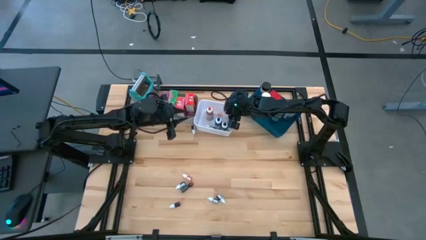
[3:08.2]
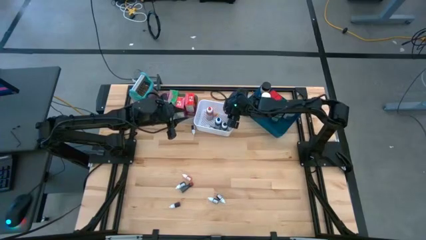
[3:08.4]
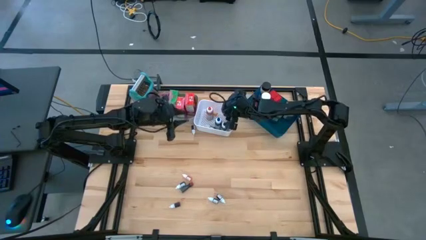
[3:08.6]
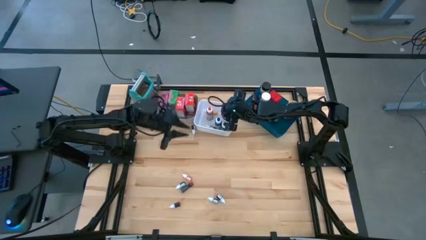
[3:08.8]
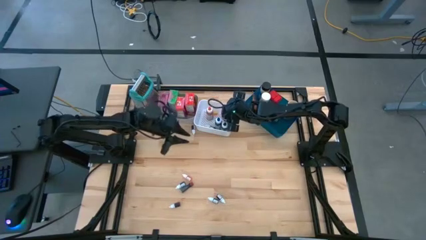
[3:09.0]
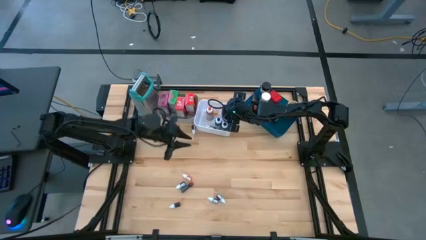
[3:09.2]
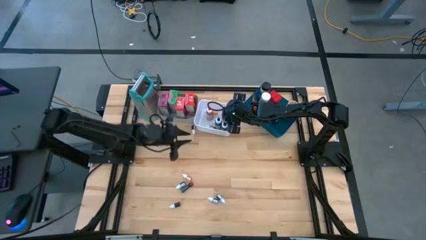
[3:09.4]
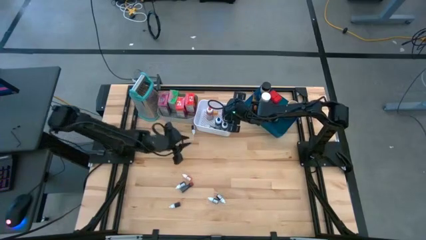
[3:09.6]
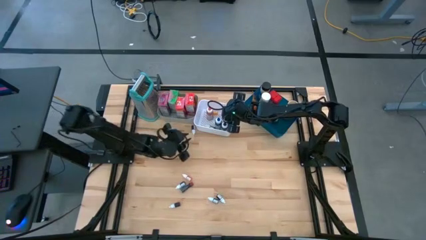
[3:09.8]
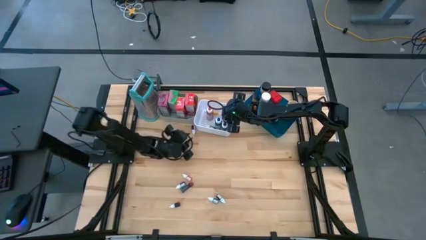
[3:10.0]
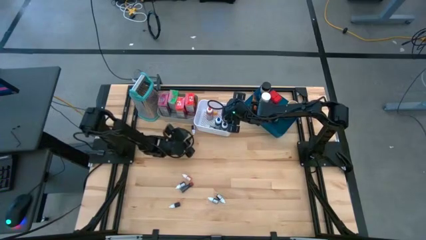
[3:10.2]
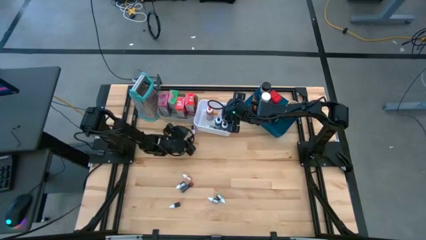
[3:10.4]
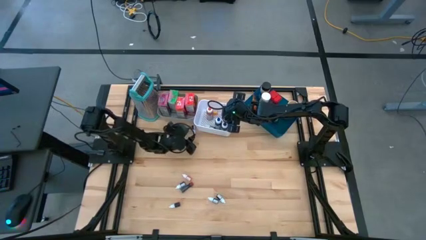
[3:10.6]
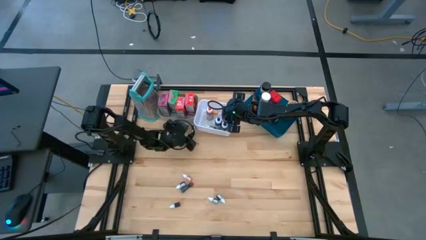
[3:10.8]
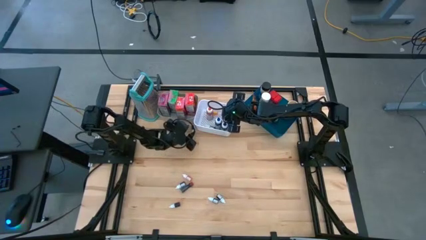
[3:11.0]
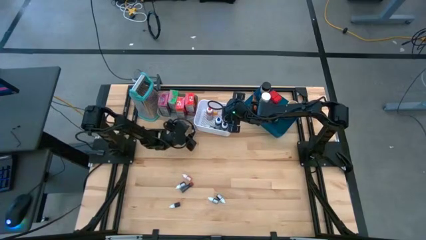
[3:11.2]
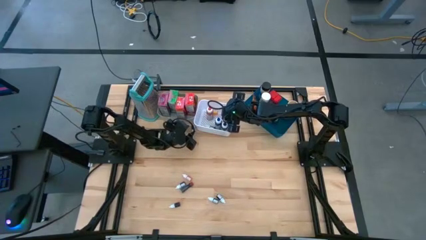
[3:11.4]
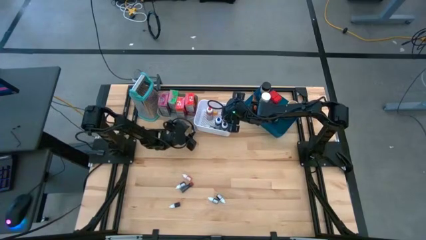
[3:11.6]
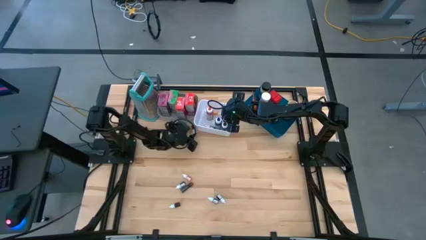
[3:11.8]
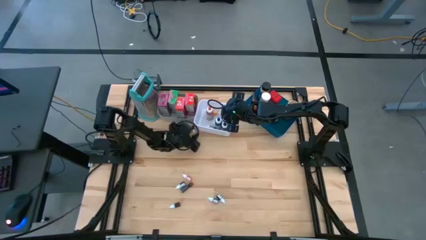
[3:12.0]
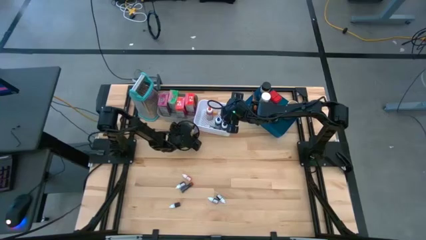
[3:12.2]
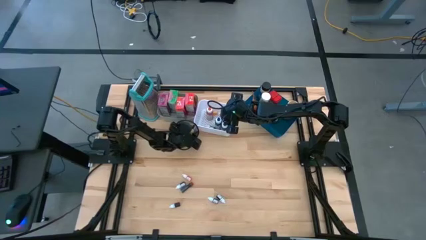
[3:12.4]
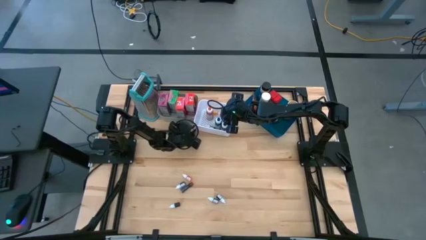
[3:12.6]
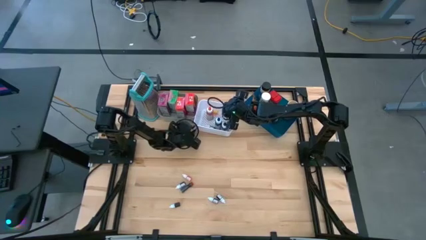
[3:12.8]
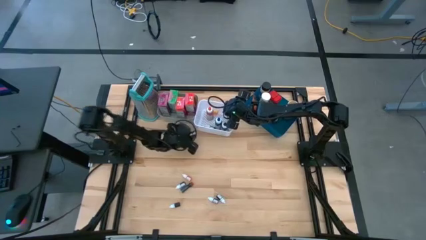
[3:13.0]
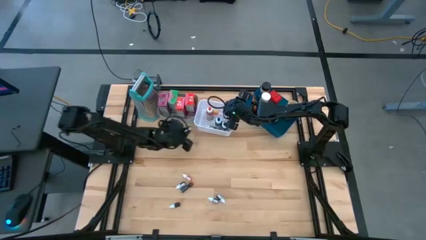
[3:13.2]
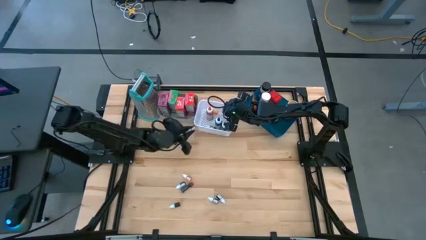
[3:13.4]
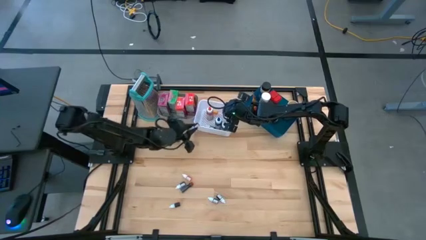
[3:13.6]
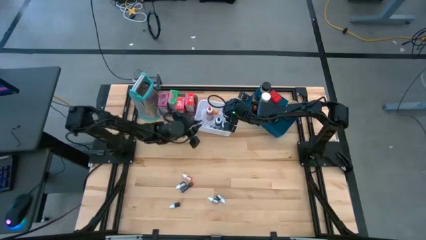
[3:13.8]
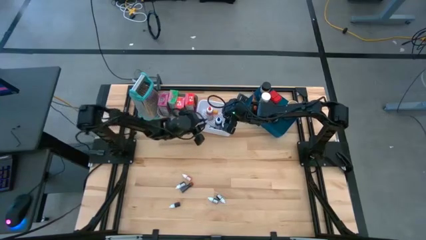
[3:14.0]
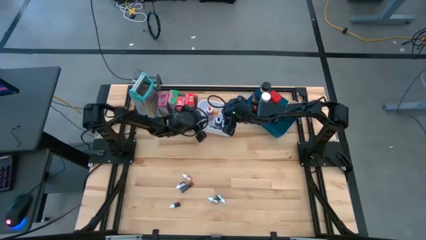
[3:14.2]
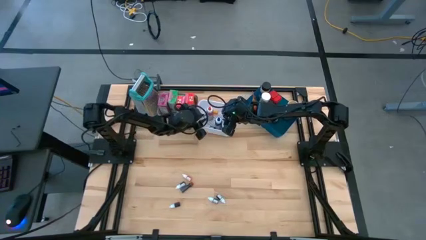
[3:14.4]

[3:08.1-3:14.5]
Task: Pick & Place Kitchen Items
Put the top small purple food coloring bottle into the white bin

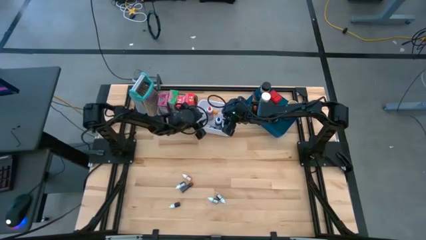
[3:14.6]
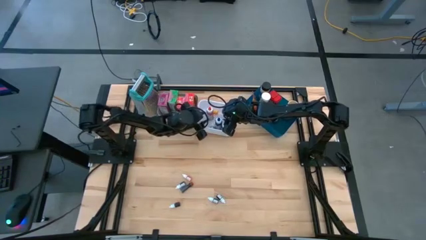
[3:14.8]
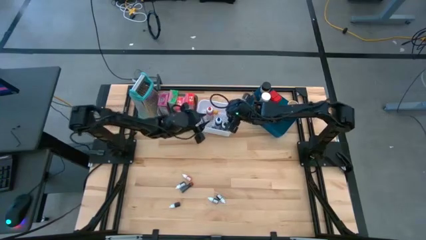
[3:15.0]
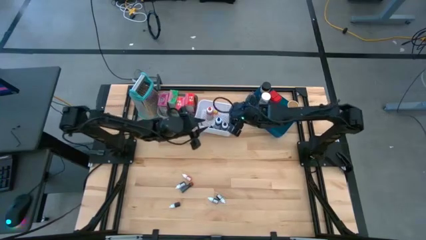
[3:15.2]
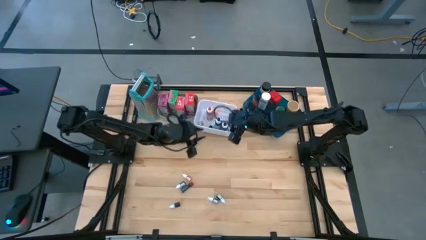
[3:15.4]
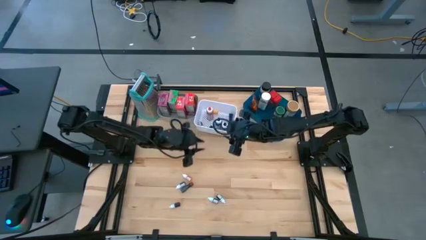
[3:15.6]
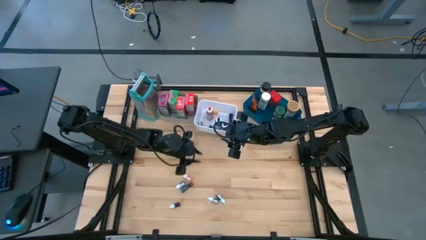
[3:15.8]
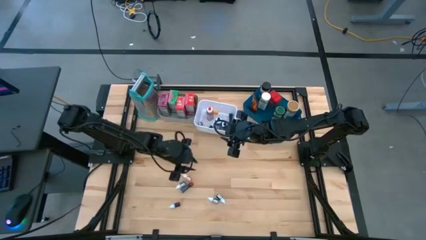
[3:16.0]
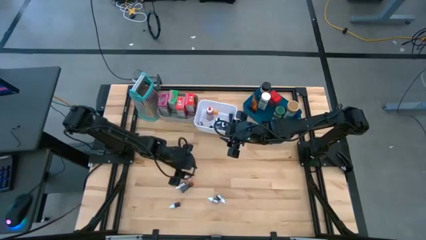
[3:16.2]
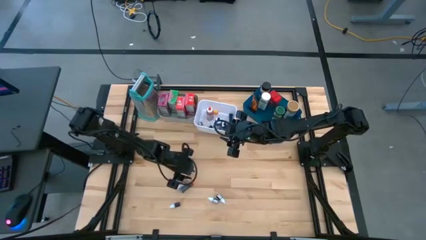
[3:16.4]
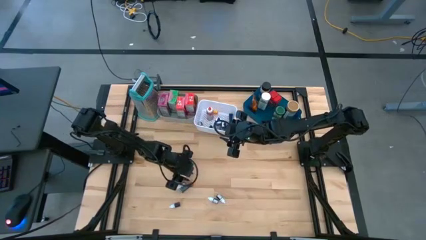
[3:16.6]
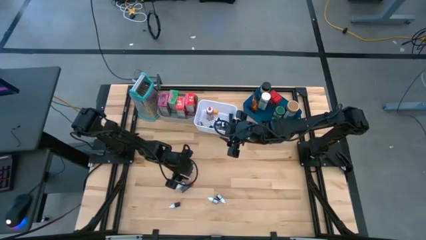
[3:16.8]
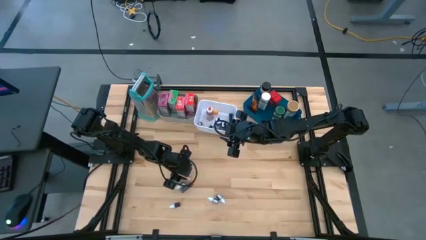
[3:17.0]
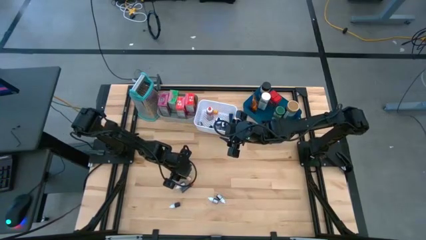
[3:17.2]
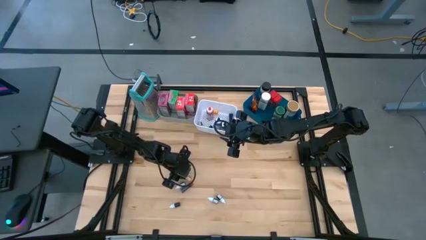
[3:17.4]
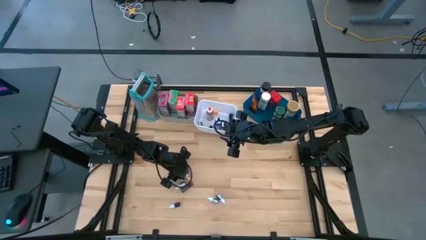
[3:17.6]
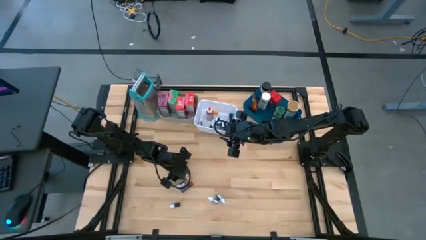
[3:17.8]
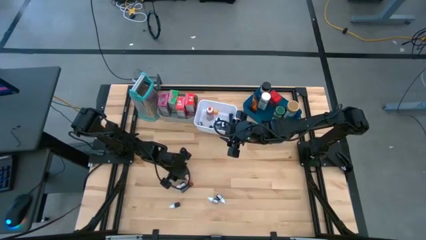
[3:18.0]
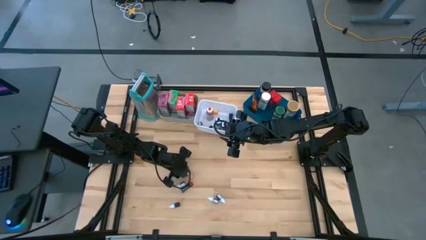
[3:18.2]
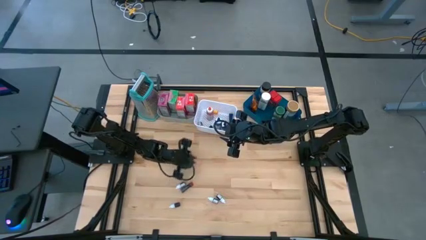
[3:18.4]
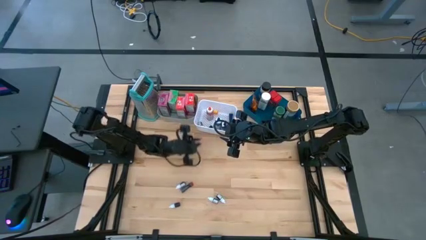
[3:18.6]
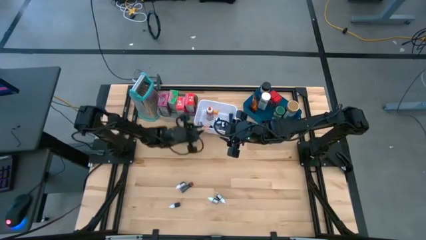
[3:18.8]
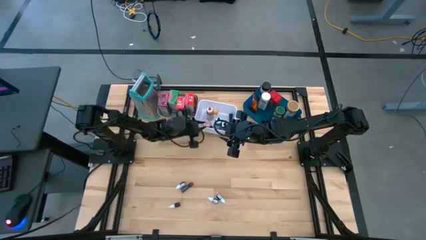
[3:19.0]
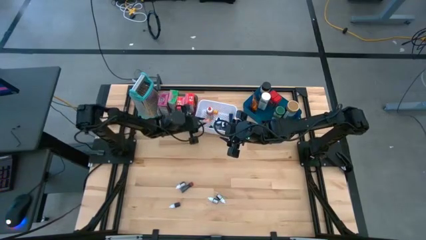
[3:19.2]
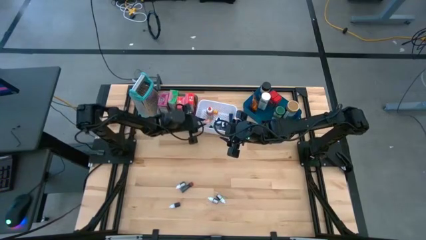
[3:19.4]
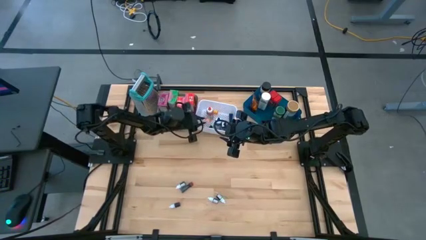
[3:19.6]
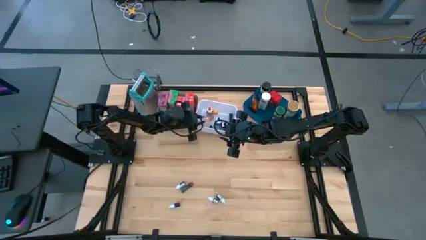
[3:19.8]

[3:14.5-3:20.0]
Put the small orange food coloring bottle into the white bin

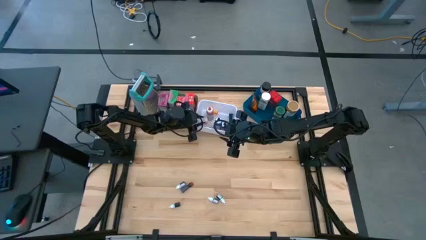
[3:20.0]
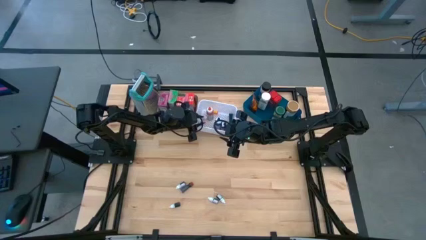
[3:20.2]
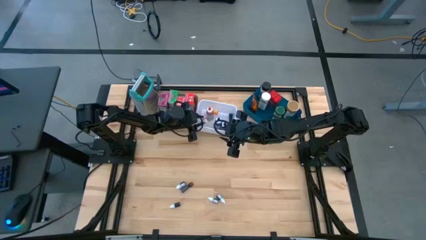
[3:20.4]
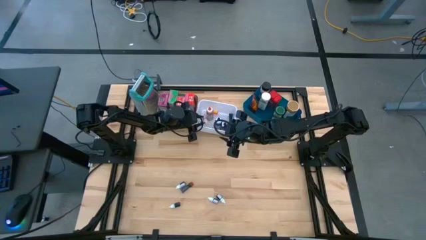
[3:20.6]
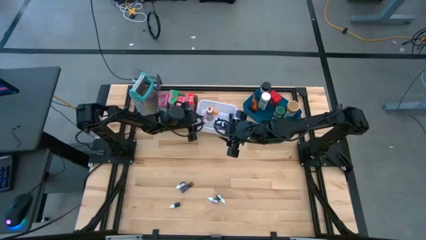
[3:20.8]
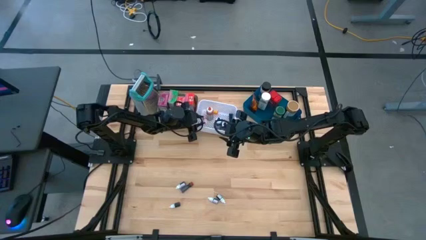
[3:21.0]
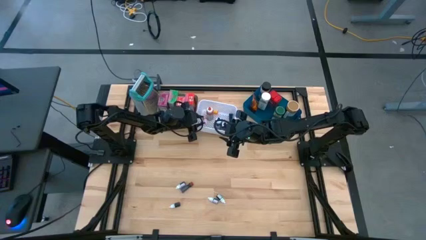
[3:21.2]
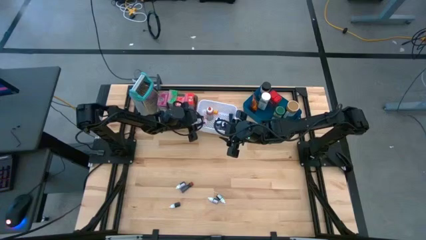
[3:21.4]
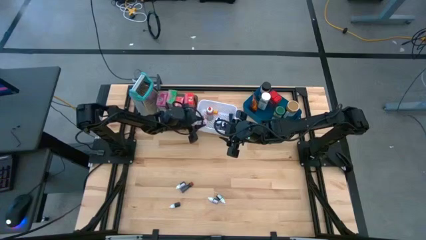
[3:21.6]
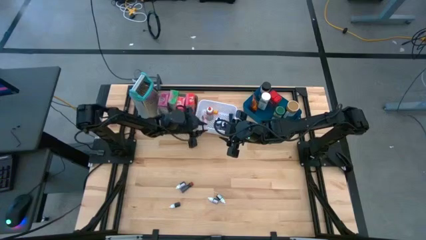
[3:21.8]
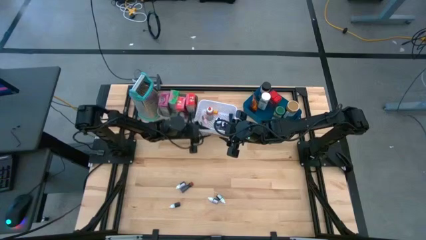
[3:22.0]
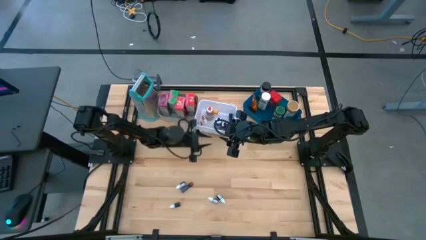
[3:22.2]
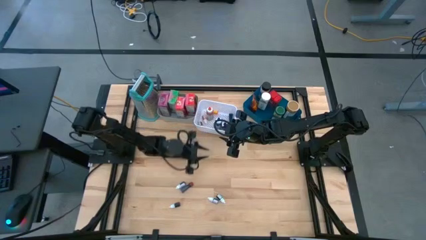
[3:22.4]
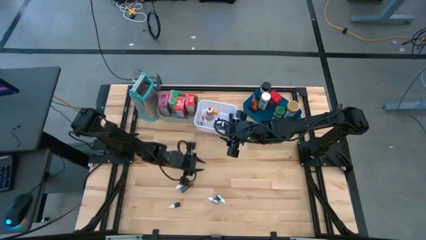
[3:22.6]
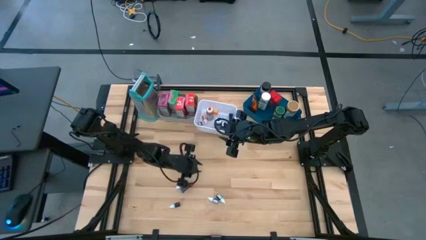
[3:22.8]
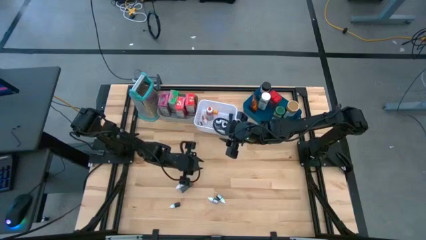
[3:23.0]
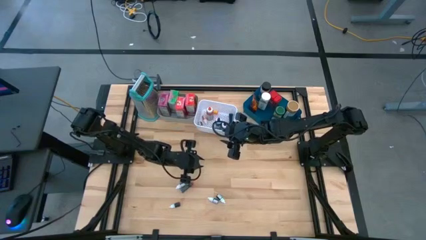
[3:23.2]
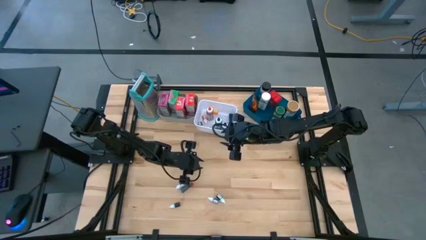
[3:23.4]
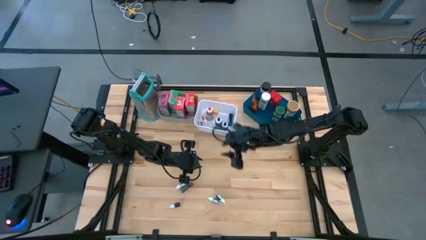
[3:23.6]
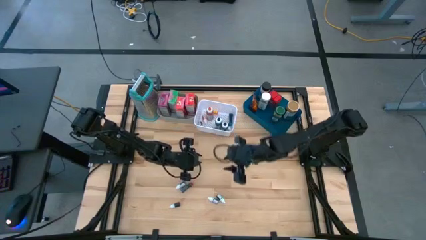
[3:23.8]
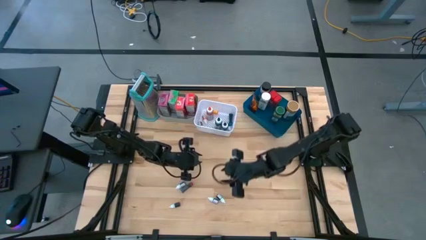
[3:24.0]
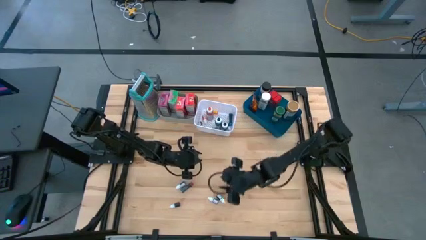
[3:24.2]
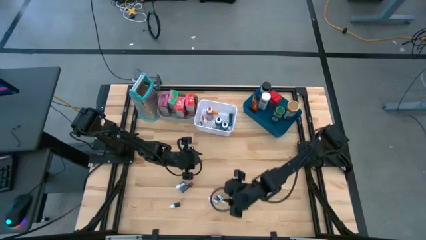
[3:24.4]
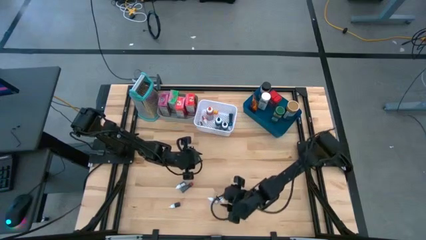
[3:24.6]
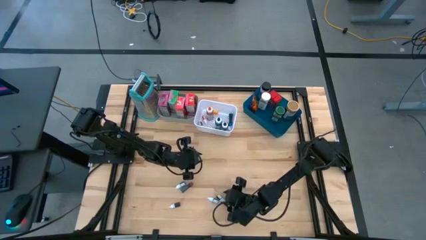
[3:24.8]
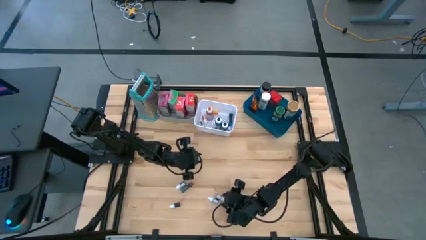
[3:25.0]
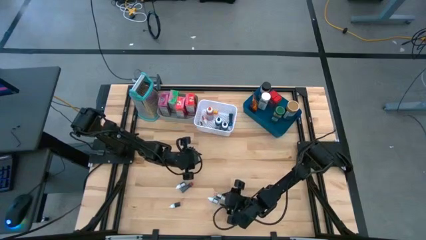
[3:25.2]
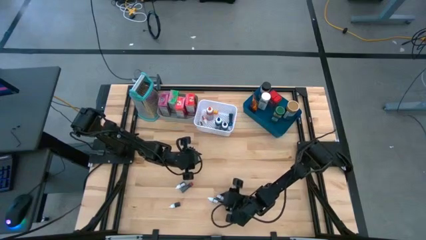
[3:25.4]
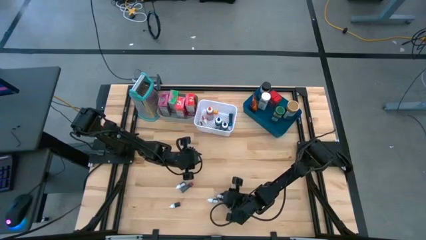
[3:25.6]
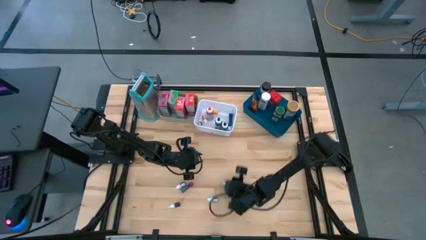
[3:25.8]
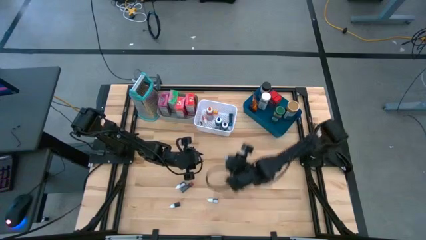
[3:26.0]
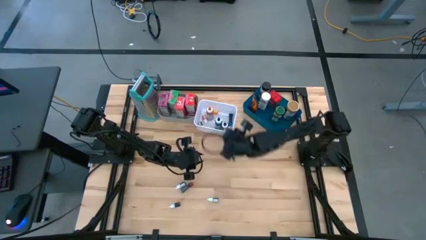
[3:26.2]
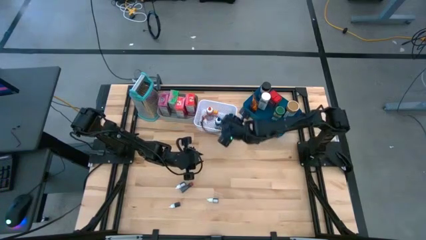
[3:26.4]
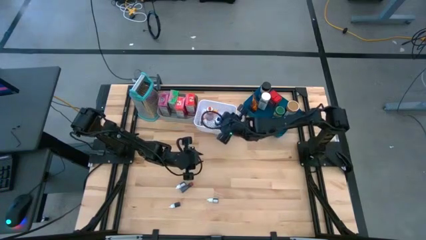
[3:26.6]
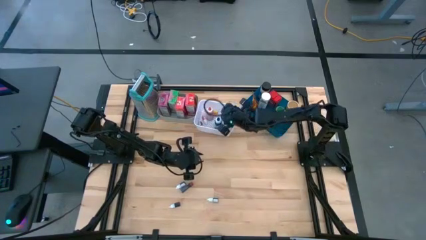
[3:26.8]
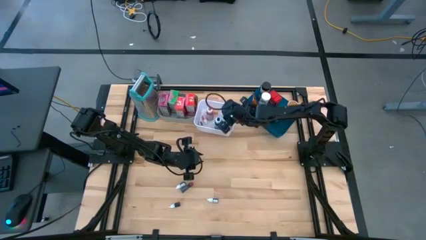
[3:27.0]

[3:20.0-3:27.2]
Put the right small green food coloring bottle into the white bin
